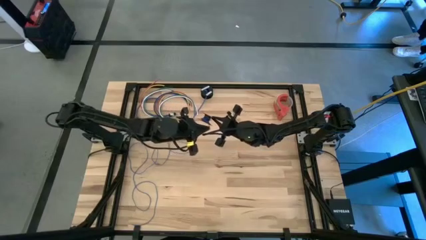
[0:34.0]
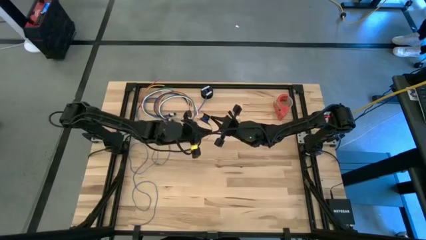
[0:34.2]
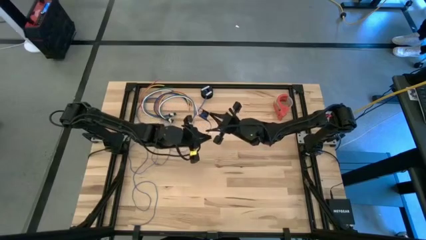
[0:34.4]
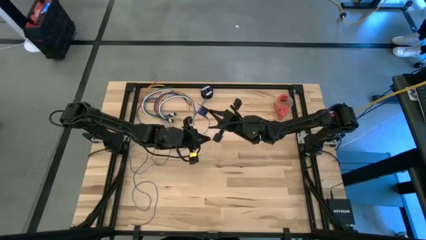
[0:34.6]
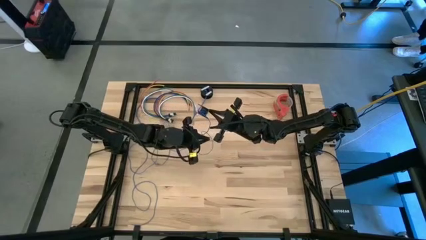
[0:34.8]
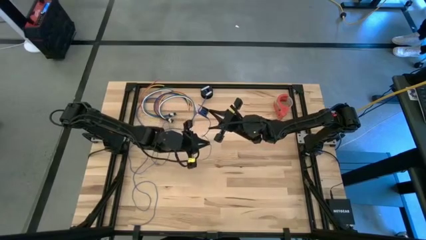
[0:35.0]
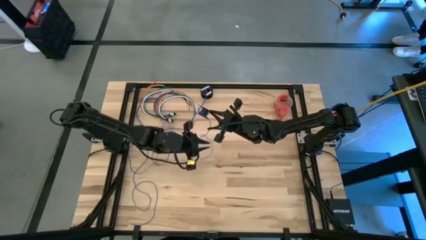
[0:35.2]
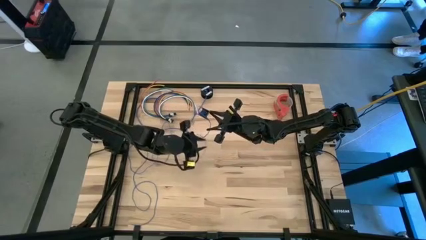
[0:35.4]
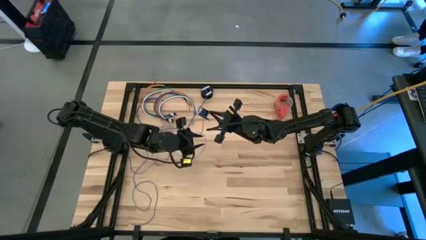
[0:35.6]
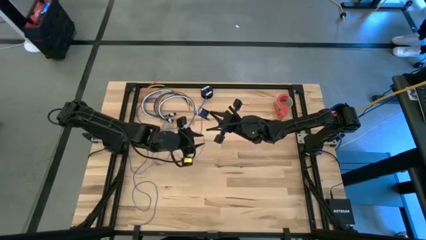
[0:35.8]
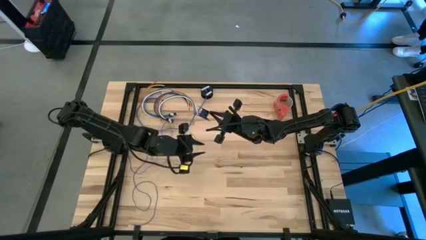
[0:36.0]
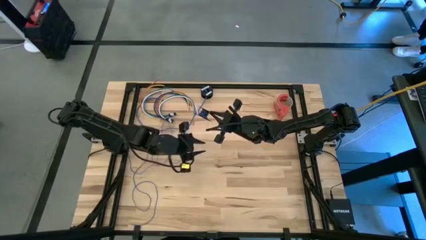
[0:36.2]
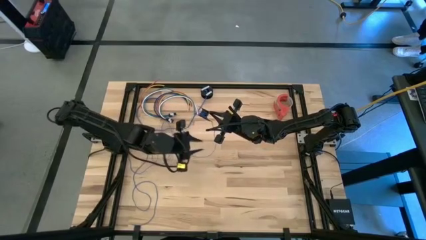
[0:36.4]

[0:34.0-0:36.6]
Task: Coil cords
Coil the blue wire onto the spool

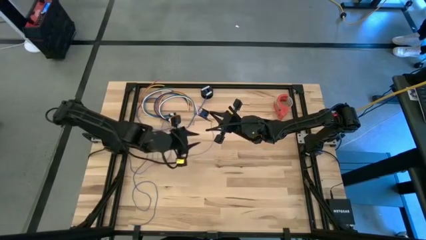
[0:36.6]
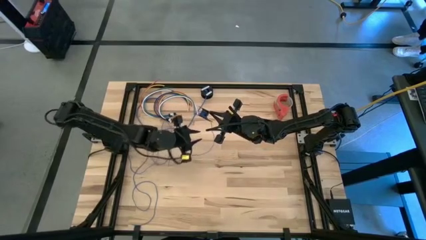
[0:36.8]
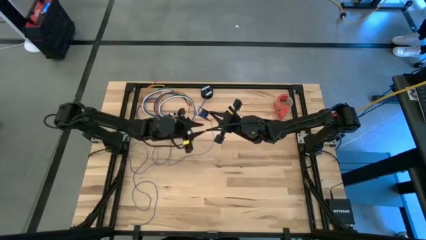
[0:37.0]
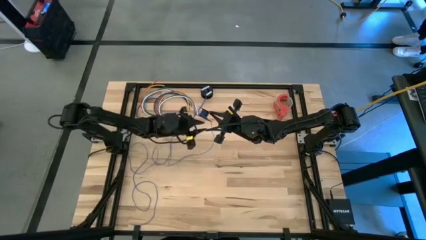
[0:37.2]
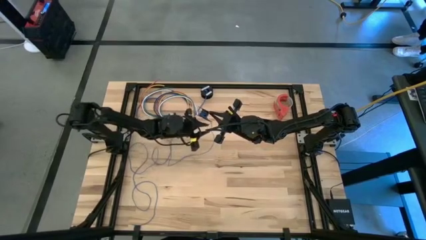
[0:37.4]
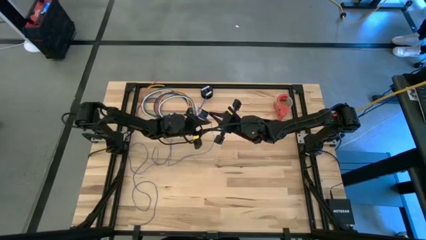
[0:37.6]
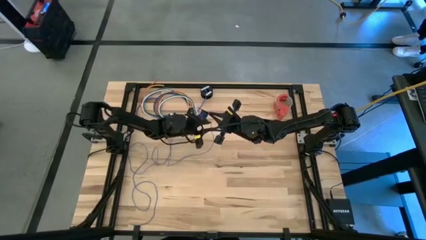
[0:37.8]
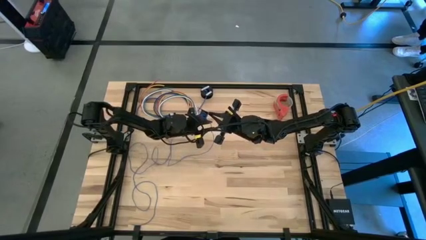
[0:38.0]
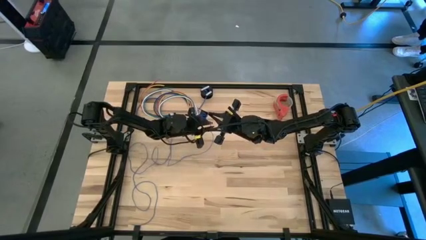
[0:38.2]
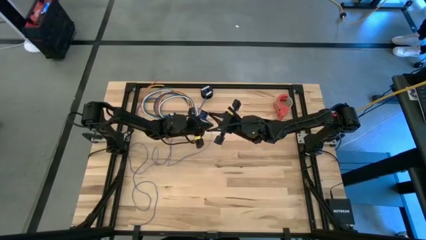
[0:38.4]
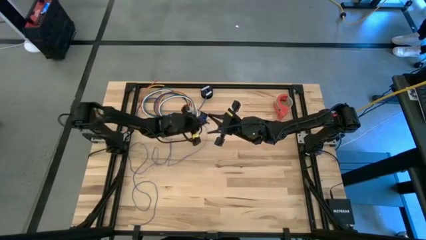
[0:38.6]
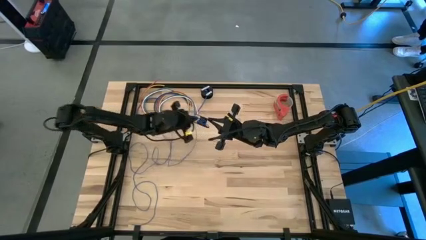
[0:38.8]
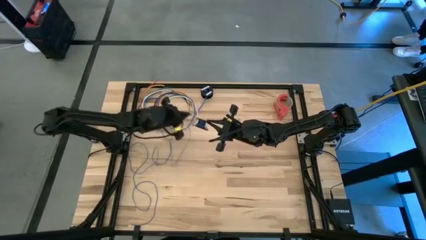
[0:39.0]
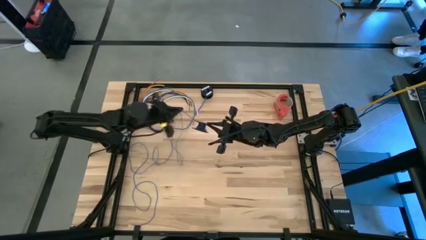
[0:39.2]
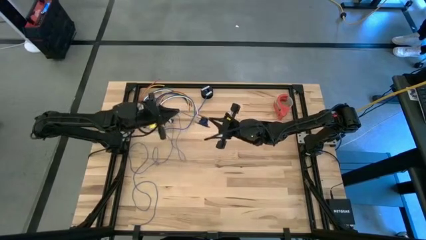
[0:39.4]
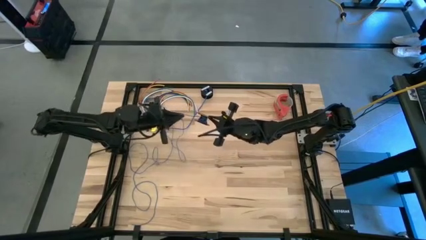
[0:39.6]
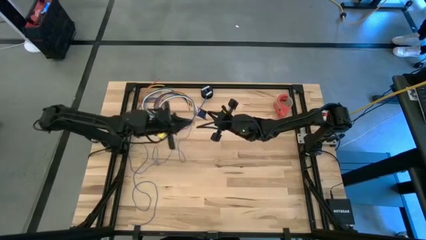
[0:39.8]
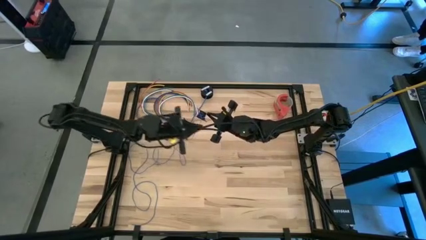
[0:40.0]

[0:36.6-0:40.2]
Coil the blue wire onto the spool

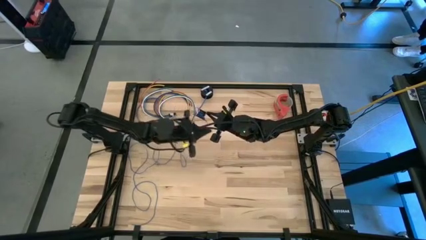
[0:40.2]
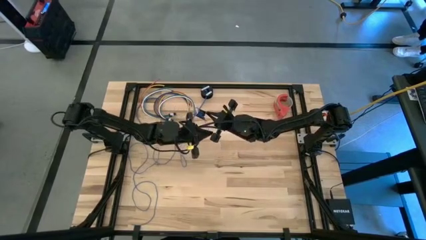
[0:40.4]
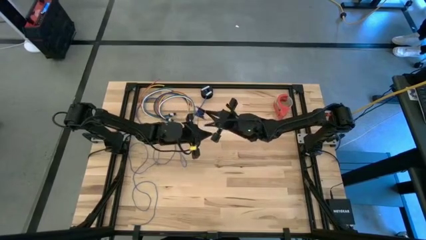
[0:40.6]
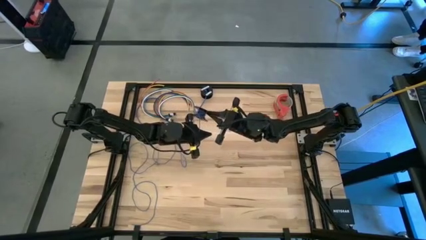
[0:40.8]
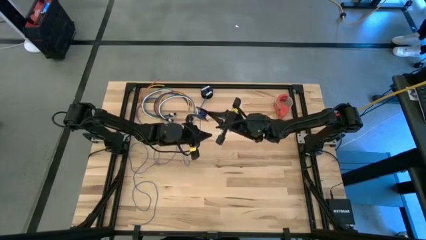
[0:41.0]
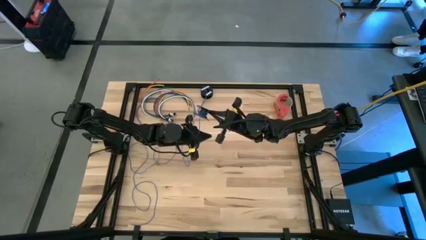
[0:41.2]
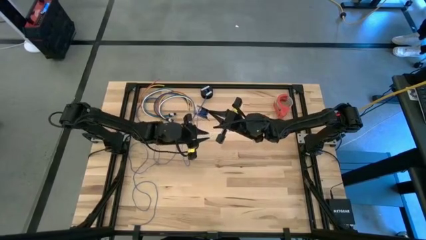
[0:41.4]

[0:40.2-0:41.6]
Coil the blue wire onto the spool

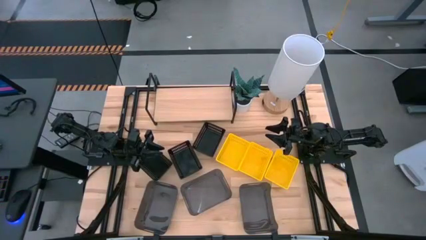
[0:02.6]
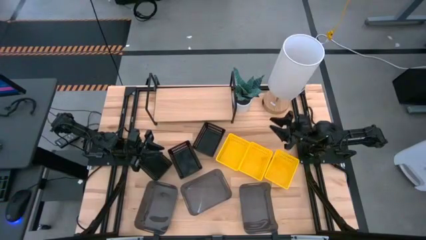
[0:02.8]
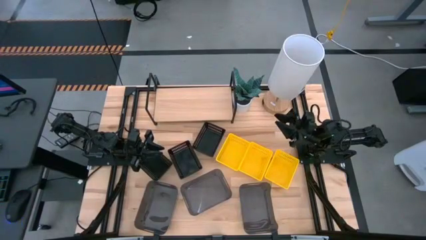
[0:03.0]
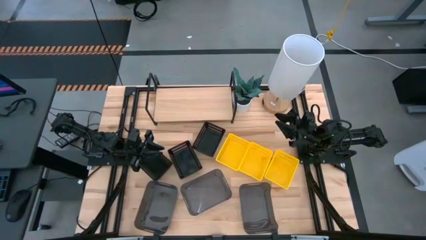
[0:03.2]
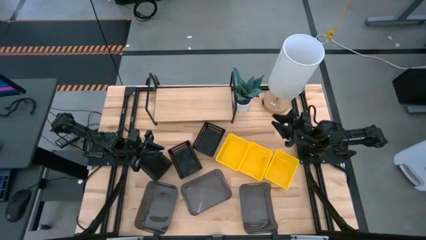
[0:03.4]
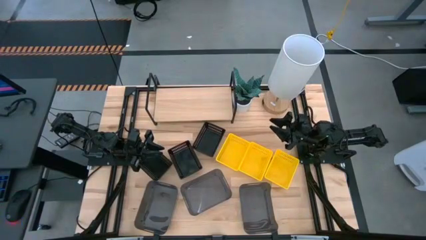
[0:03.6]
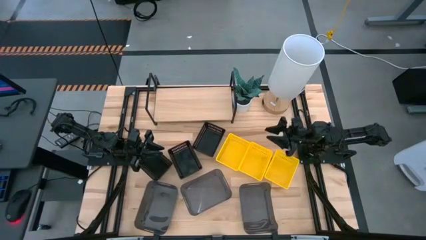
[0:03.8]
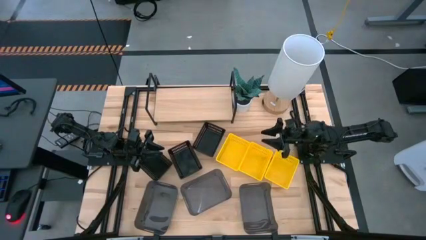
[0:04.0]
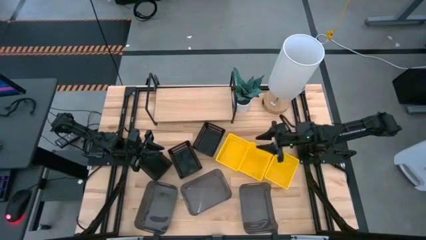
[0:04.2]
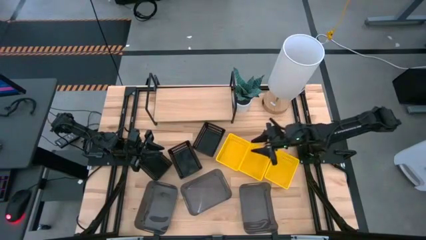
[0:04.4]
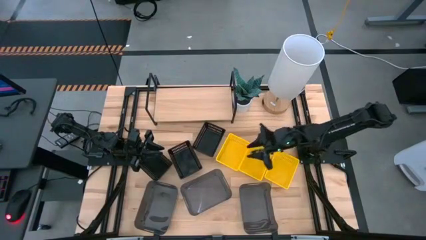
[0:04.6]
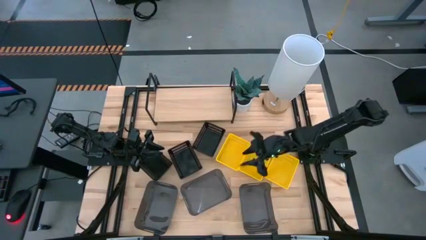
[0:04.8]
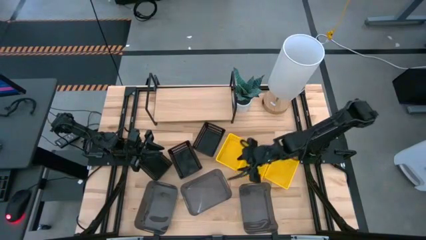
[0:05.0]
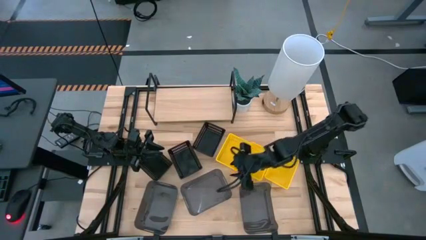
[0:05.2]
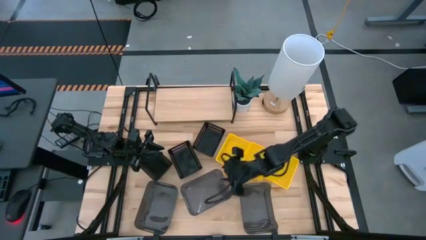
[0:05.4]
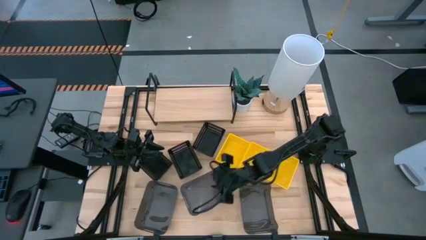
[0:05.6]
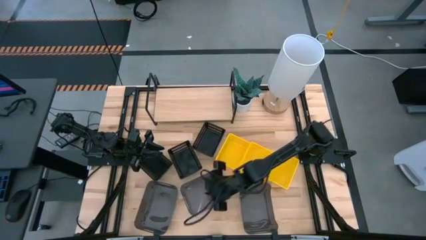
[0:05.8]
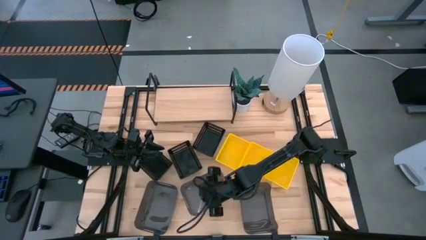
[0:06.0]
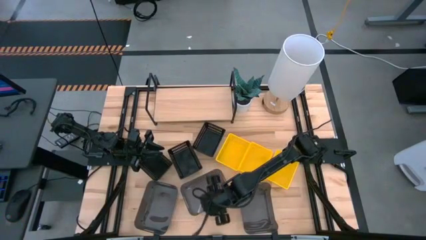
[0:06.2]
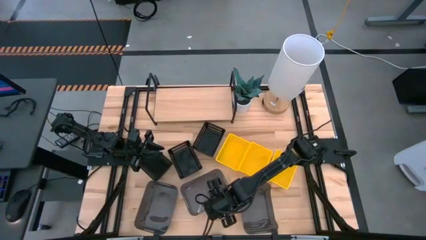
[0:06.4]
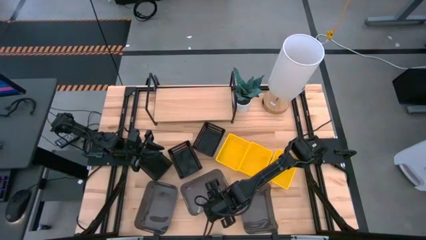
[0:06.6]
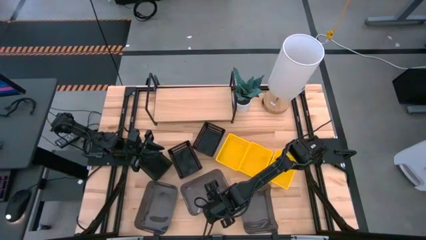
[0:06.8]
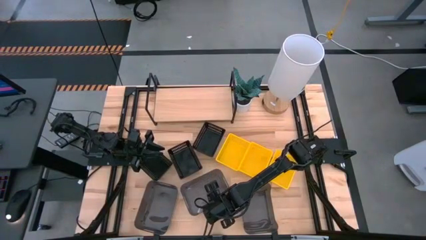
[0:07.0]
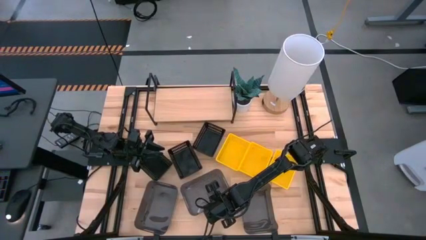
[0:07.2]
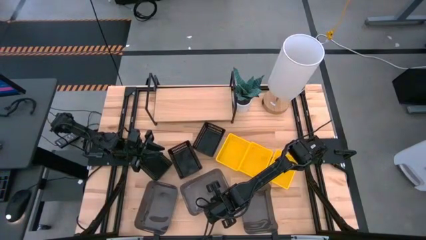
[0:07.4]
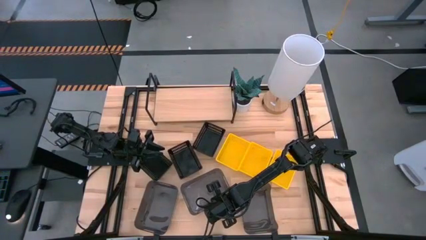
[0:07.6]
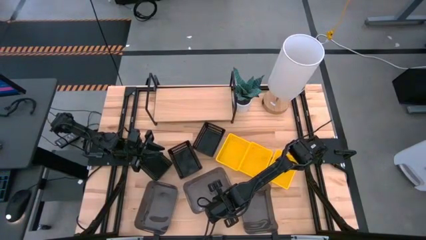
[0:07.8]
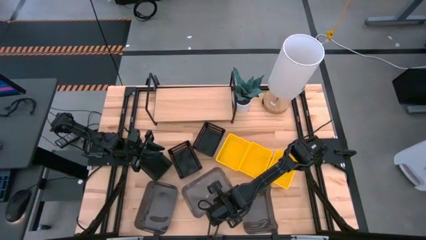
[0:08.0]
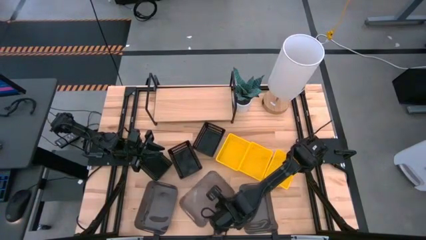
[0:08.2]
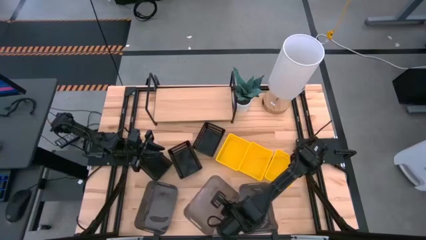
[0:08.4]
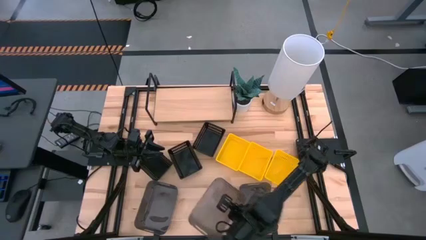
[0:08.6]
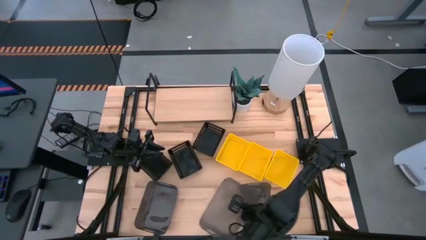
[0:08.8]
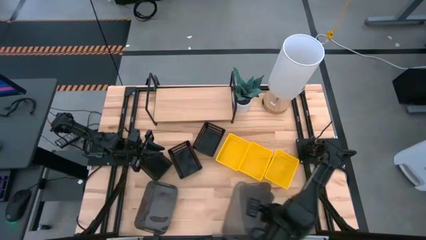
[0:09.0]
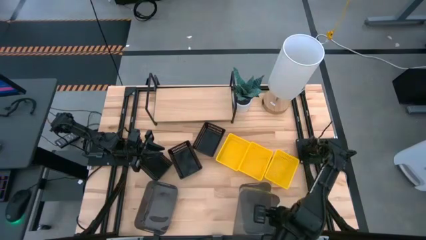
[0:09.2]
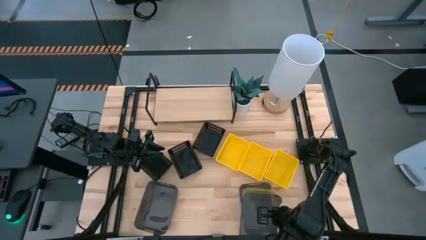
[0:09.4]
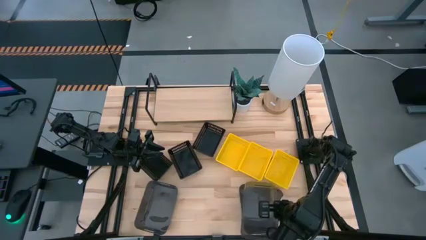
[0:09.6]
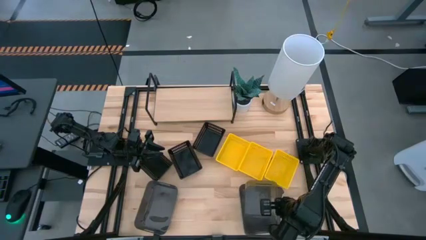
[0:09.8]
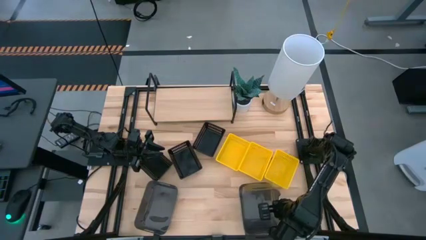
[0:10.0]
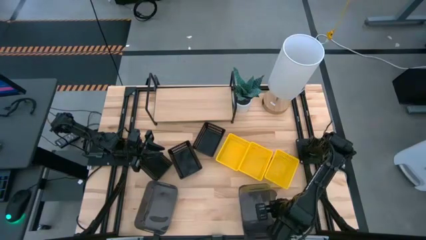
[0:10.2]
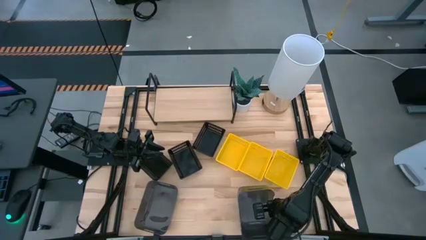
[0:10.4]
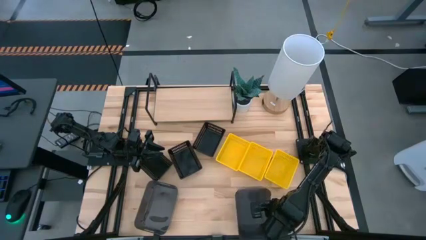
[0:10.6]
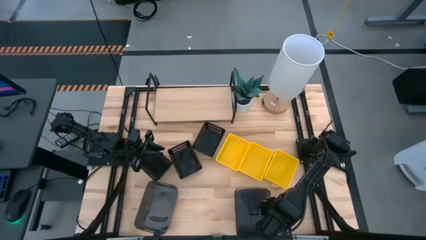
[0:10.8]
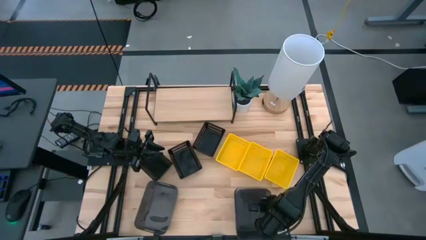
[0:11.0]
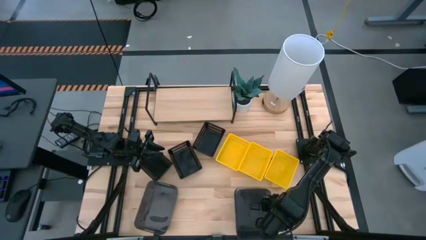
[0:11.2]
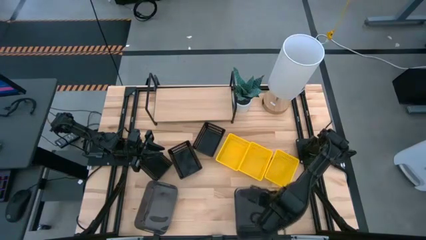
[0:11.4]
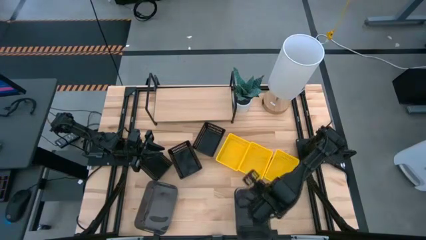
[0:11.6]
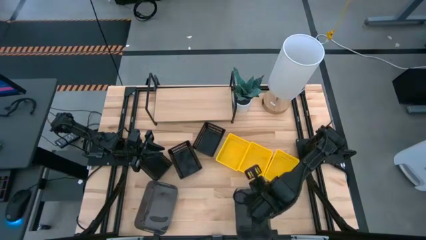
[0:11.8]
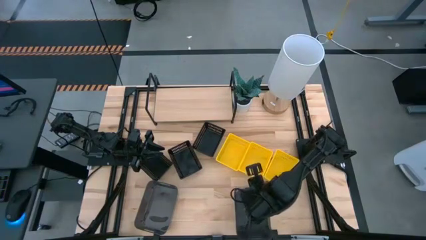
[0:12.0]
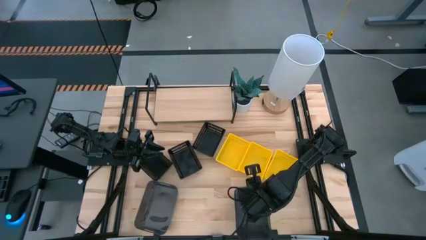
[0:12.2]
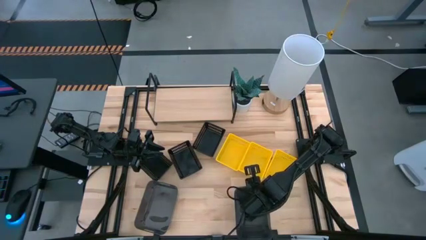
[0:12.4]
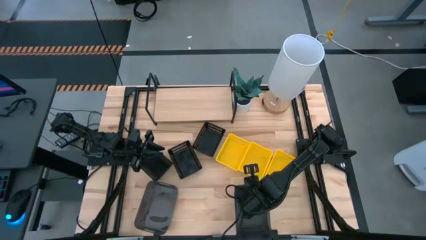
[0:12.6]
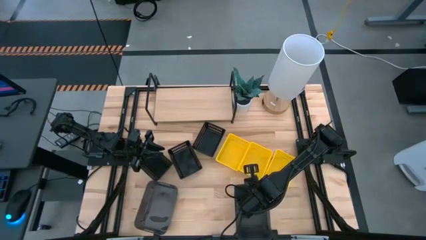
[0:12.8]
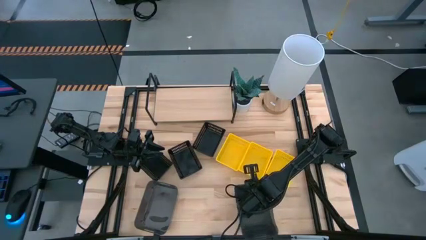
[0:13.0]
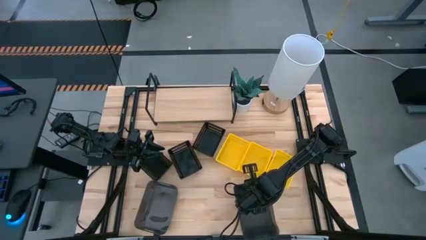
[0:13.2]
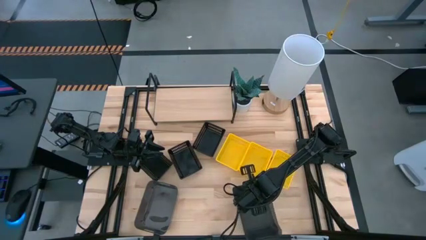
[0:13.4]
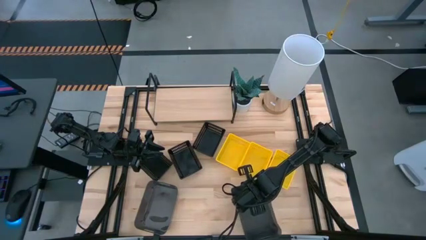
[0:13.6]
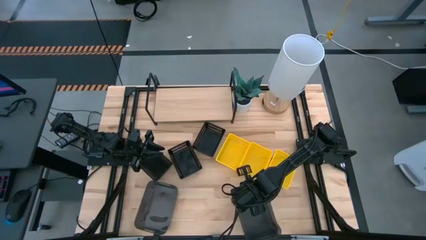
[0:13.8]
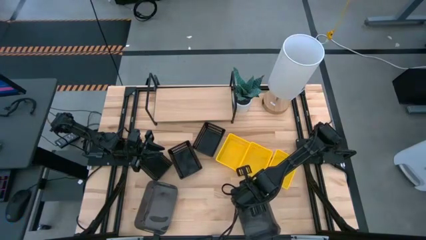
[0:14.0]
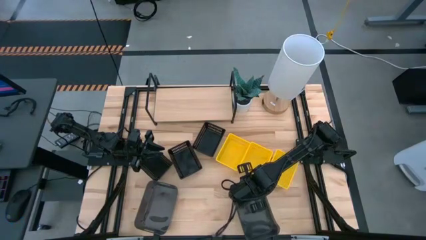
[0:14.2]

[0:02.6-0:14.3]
Task: Stack baskets on shelf by color
Stack the middle gray bin on top of the right gray bin
